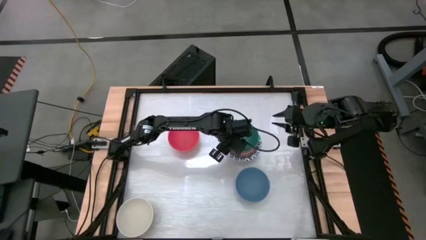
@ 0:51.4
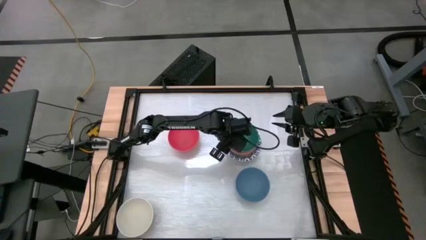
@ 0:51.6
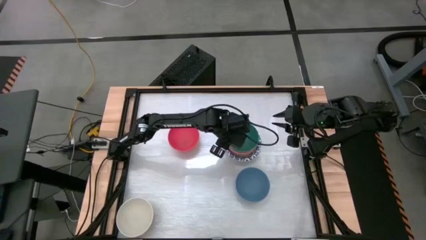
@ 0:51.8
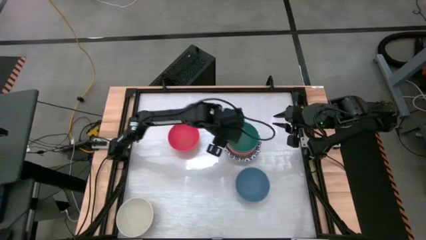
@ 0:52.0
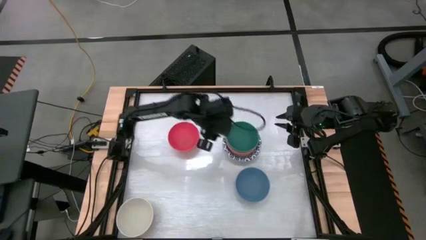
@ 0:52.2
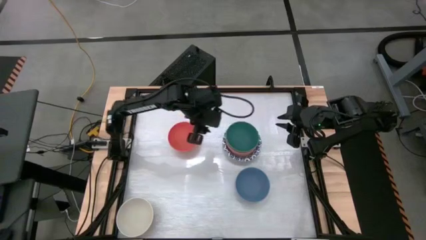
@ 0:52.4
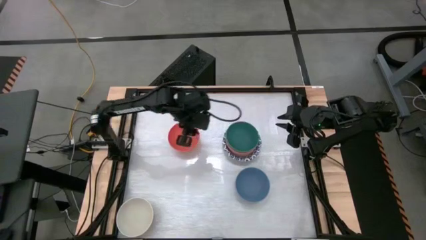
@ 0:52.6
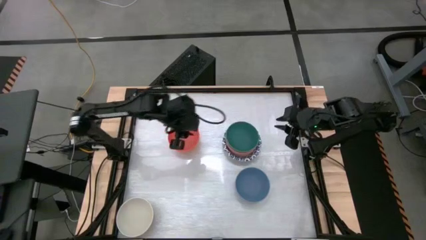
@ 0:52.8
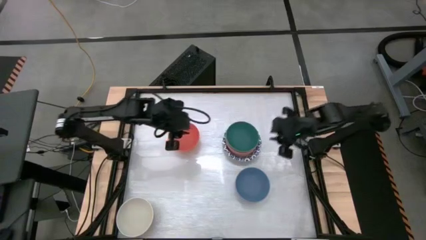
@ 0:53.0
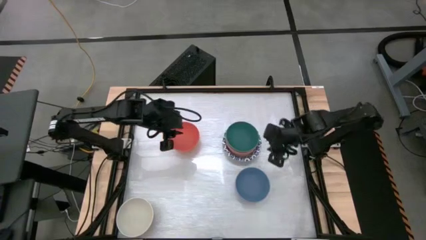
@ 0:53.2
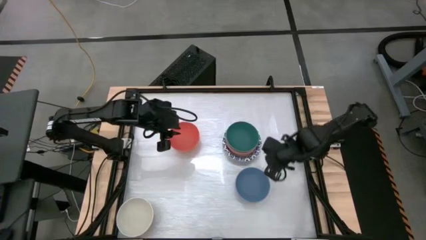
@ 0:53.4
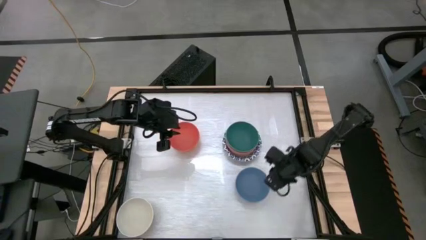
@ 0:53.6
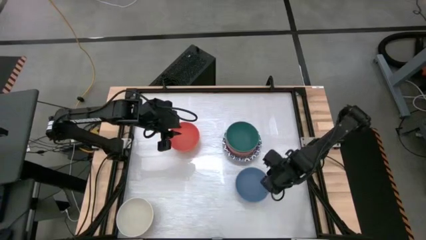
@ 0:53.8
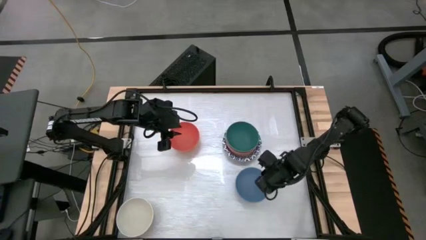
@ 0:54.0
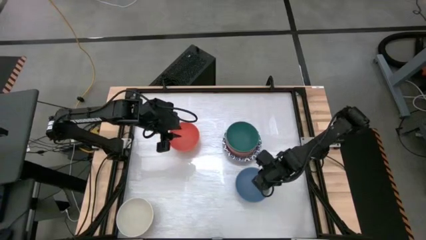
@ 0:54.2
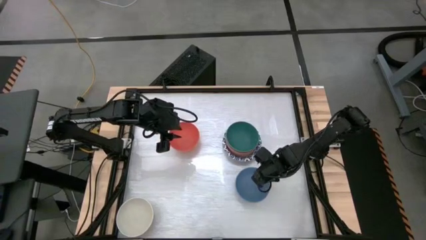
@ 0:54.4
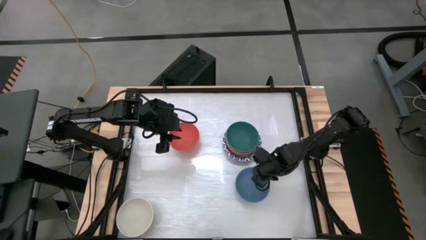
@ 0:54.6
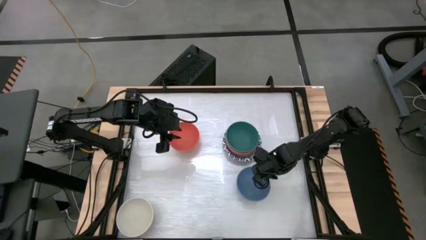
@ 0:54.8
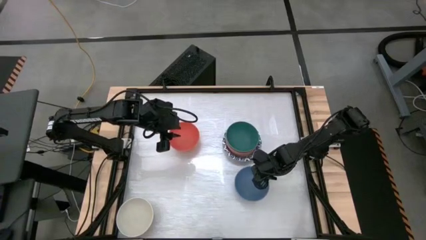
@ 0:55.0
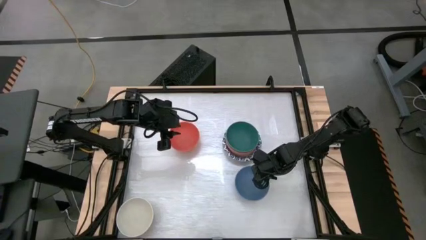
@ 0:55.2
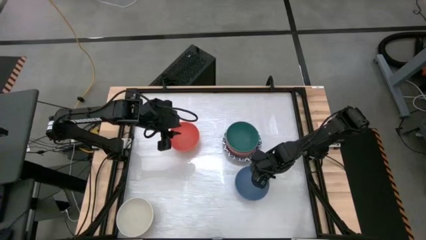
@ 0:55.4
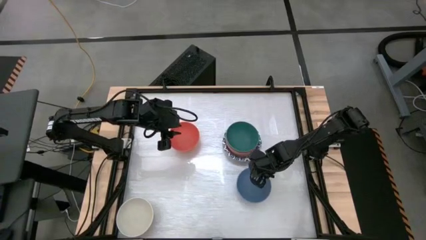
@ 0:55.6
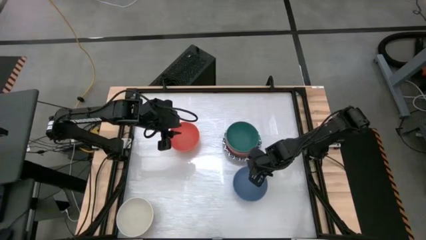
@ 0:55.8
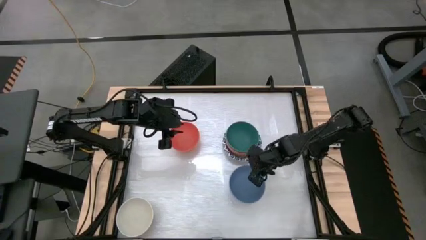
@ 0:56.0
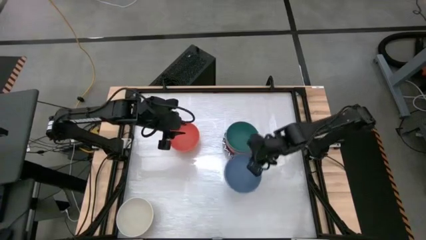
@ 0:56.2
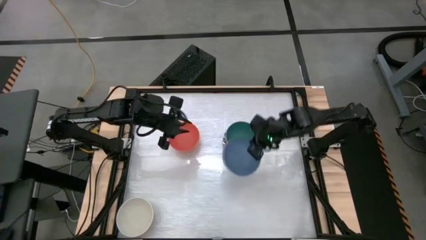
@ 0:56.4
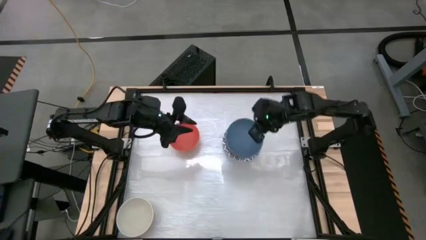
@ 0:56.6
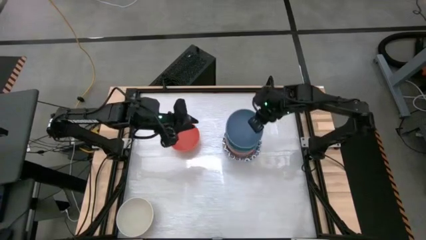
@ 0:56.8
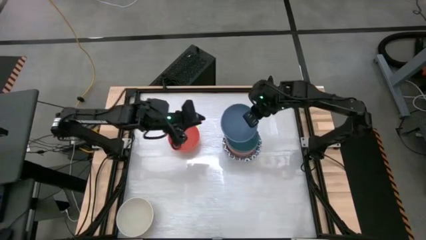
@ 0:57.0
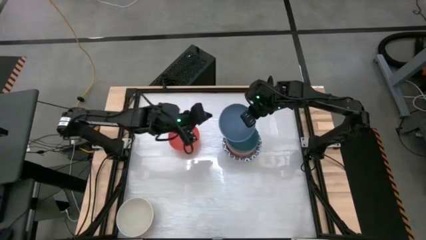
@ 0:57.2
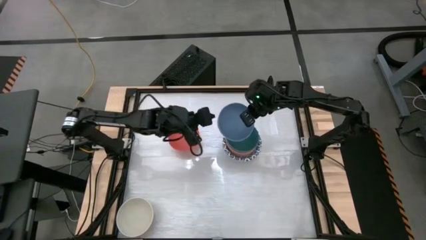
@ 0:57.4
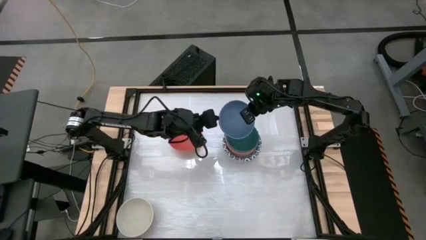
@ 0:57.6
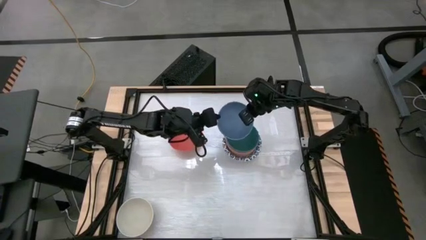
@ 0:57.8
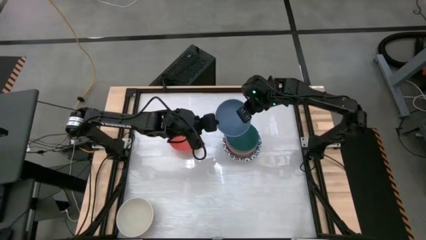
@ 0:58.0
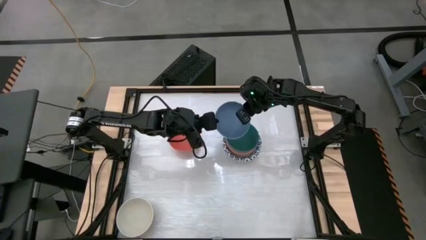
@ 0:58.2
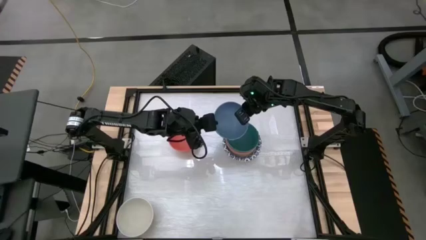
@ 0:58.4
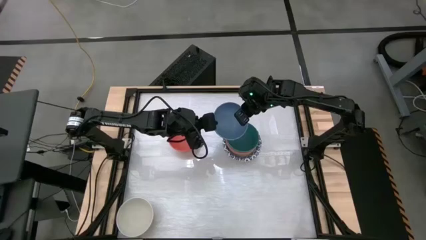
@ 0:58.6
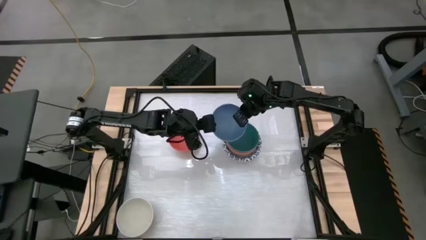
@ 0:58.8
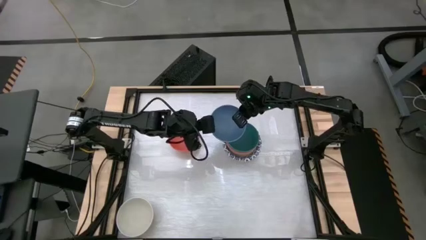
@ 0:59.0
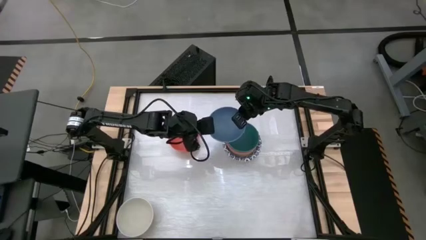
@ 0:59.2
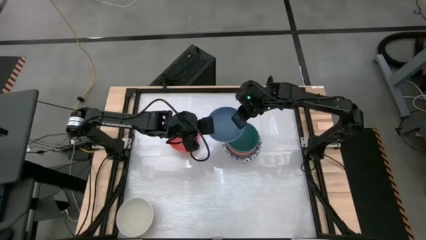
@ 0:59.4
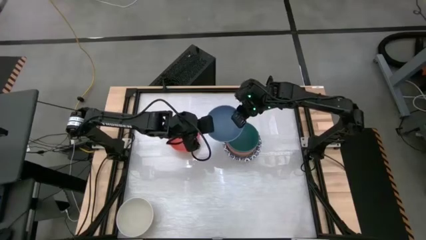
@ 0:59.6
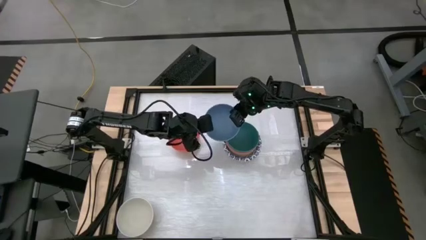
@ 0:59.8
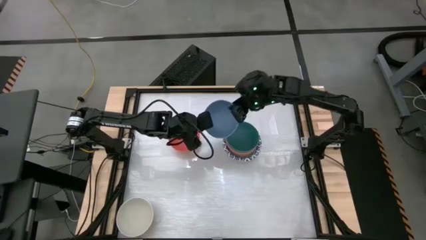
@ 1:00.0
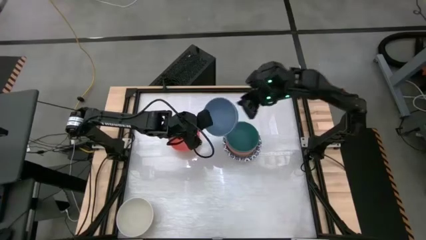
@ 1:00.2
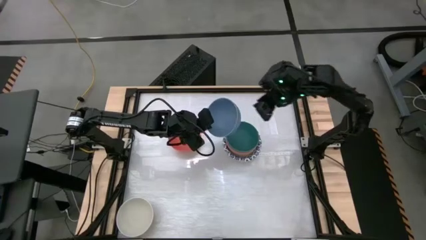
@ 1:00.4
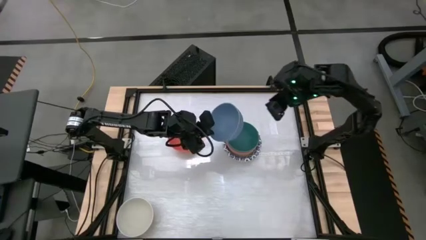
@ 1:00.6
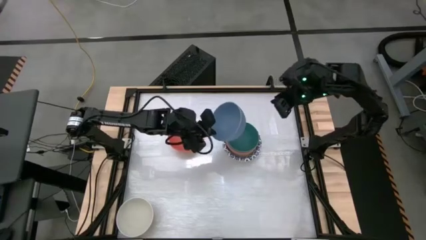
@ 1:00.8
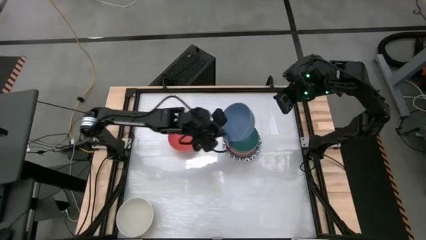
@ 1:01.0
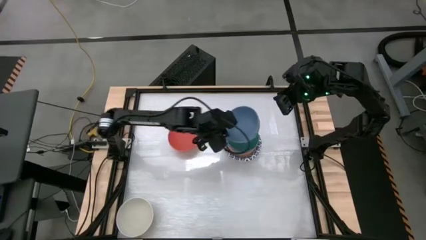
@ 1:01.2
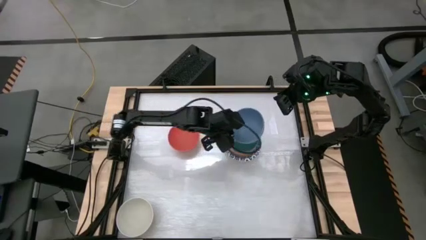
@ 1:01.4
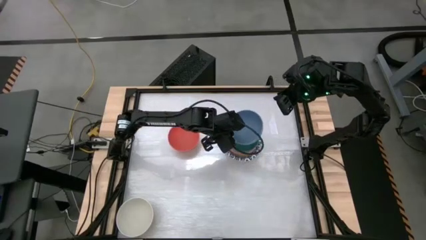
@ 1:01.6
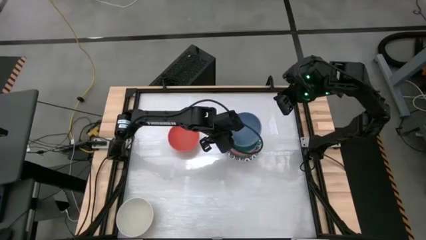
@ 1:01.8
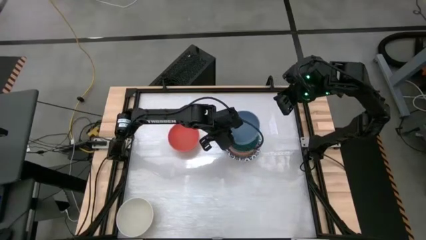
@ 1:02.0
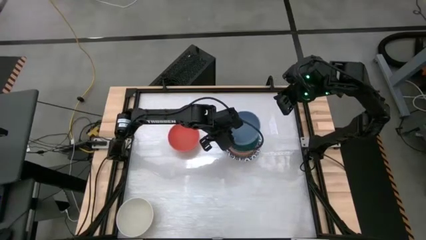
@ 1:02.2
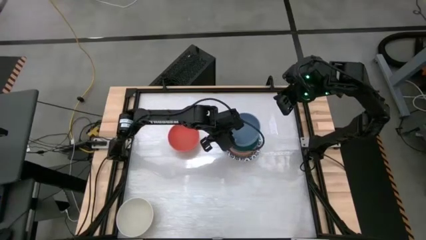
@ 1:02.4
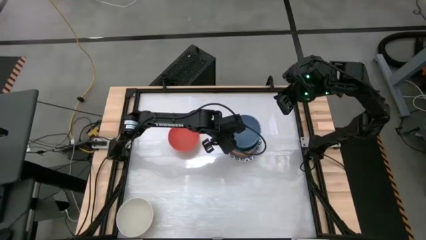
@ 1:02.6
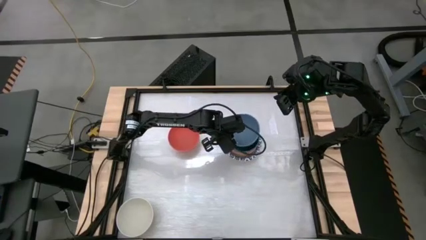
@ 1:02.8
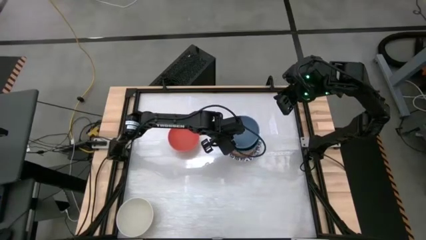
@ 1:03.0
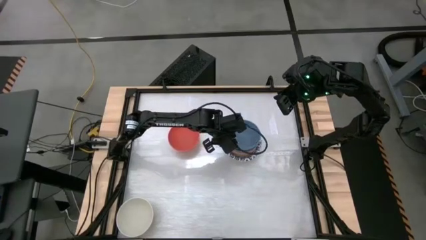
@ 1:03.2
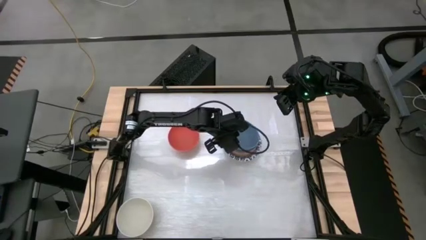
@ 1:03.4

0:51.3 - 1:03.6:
Stack the blue bowl on top of the green bowl

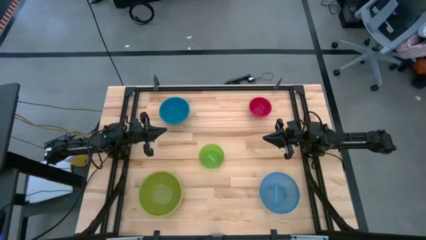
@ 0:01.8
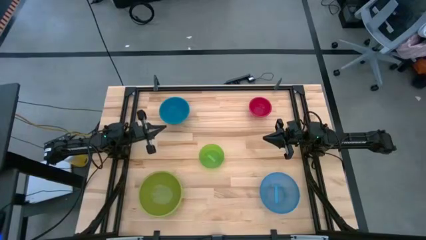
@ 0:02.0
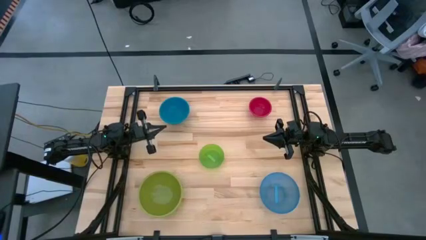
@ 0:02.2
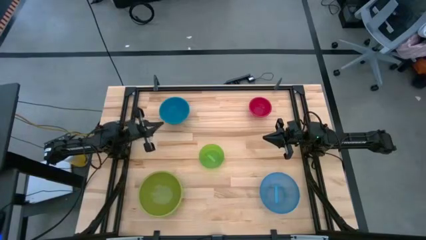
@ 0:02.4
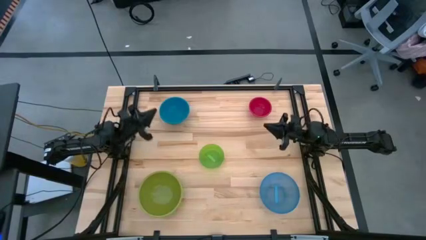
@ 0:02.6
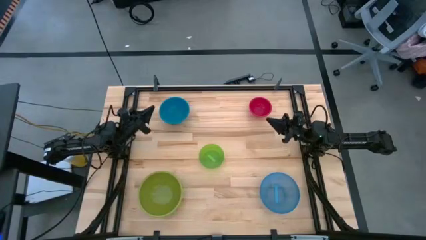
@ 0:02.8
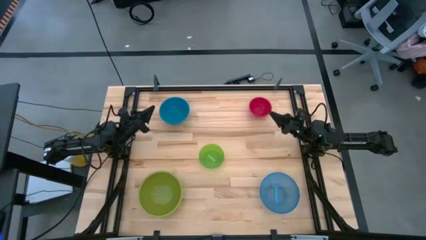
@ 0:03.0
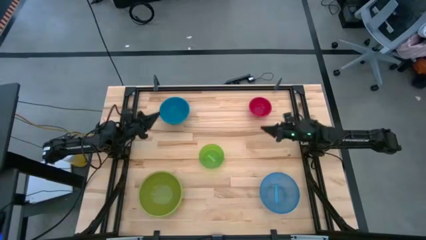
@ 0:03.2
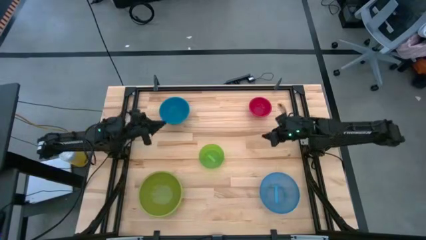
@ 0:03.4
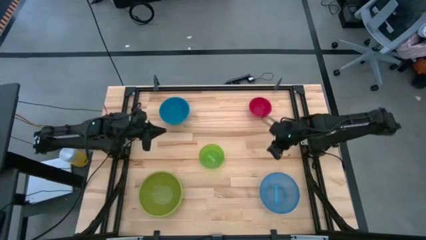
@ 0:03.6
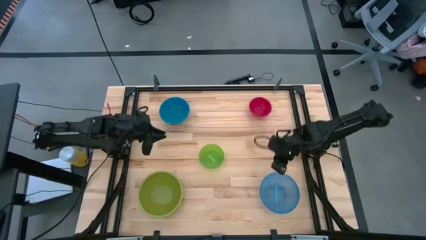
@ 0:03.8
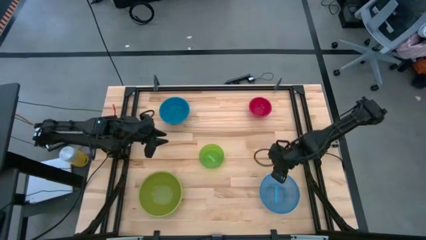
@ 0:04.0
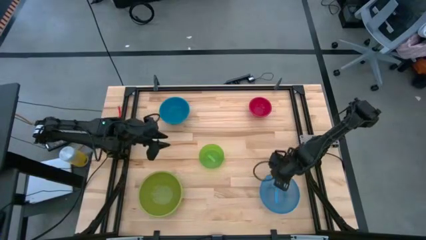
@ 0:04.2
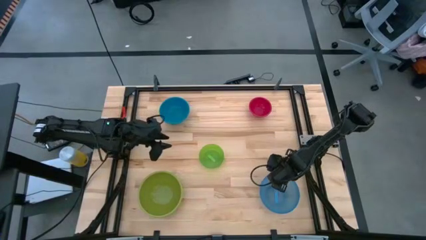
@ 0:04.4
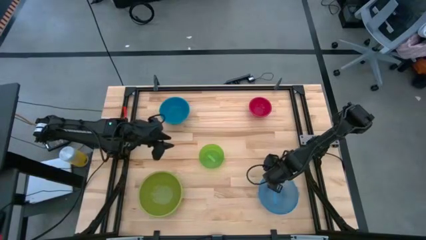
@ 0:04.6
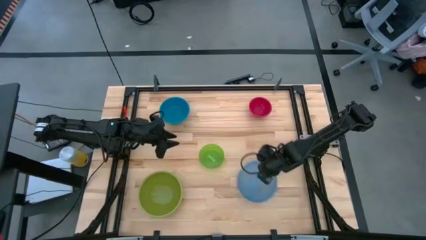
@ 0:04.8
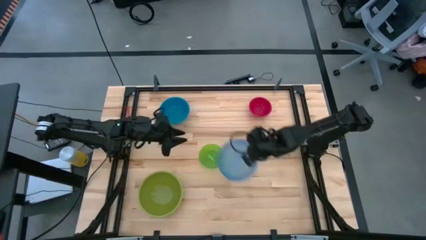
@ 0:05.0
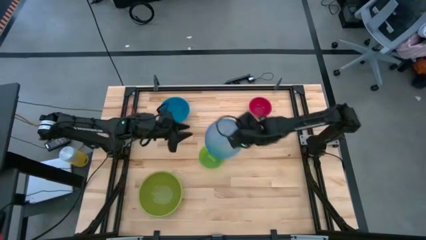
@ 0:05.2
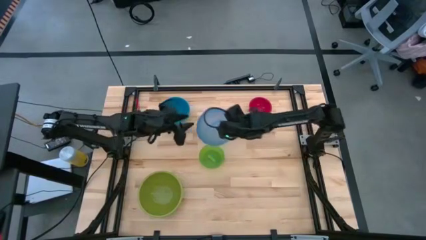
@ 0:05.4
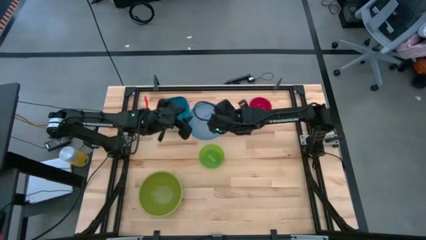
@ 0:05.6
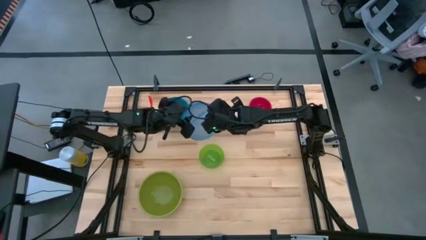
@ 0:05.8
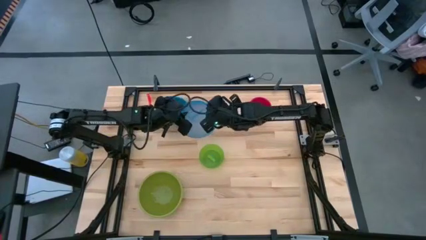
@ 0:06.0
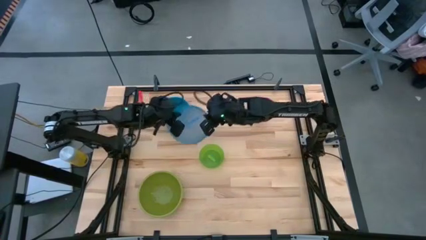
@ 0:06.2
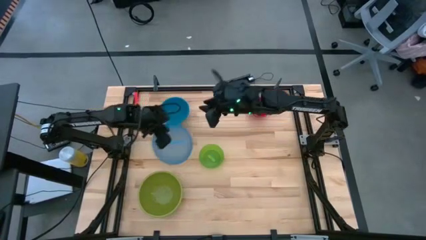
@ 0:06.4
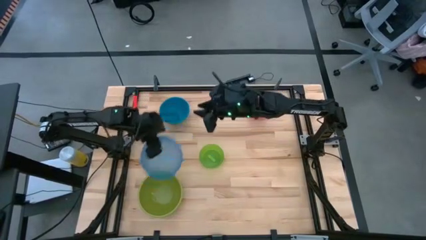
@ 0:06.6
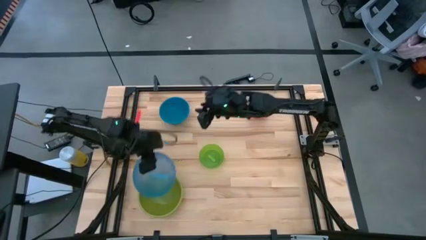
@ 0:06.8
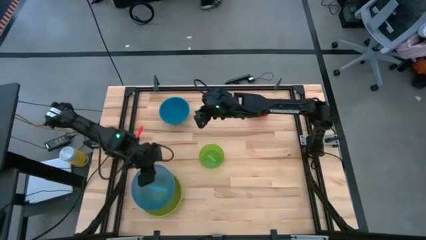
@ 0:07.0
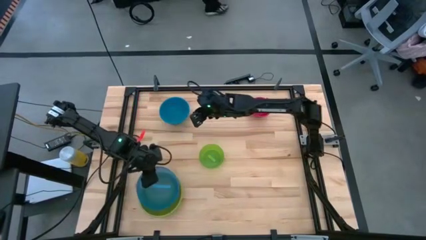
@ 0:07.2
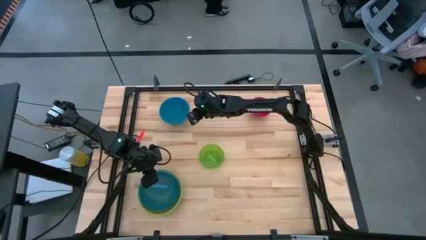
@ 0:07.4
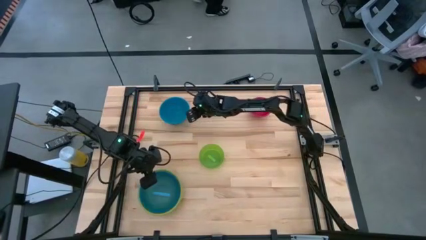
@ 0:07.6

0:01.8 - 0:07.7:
Stack the light blue bowl on top of the green bowl
